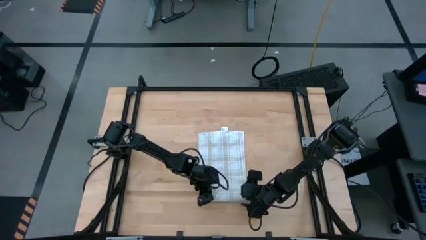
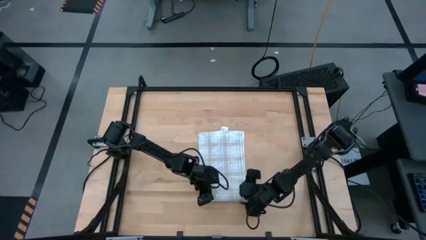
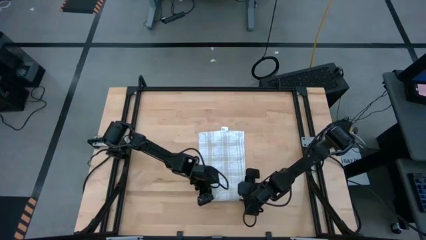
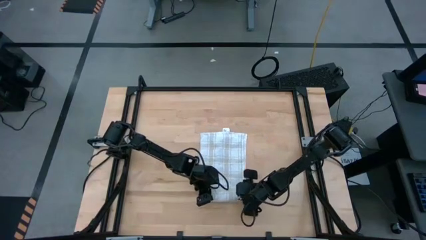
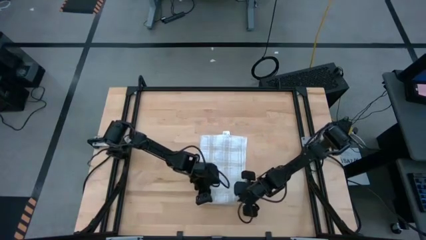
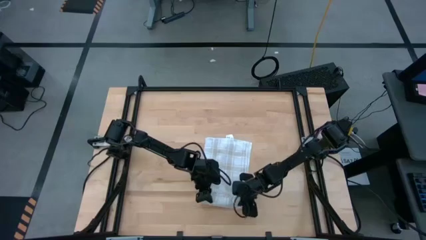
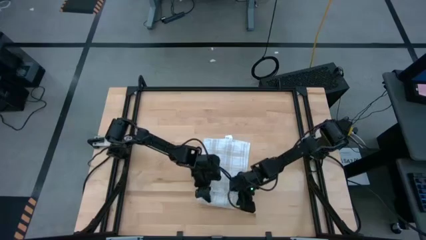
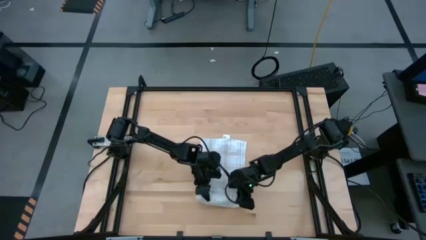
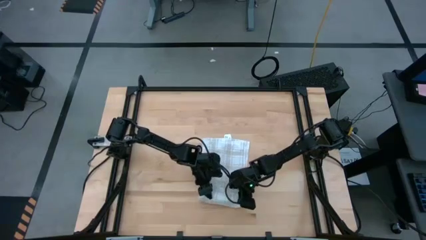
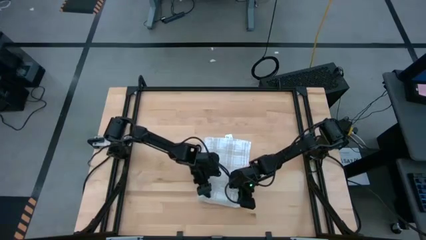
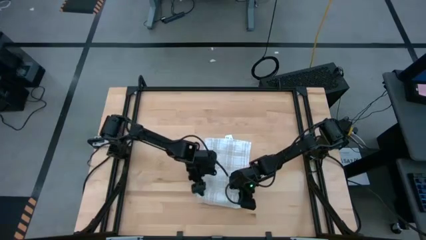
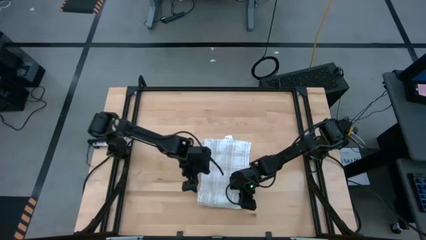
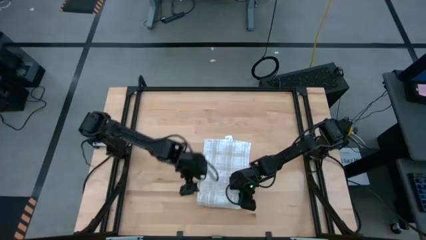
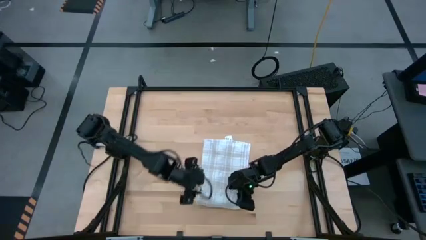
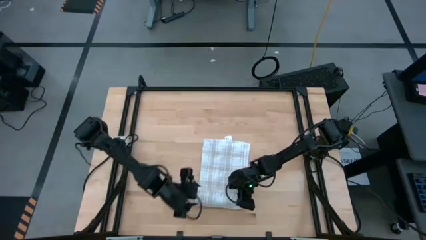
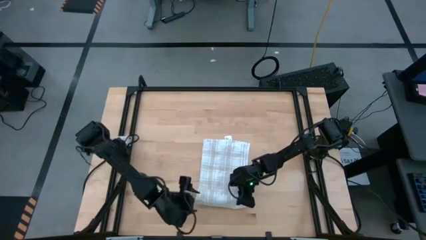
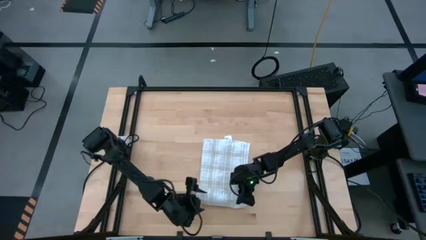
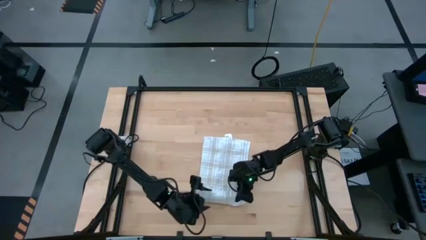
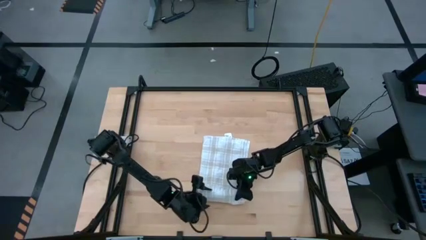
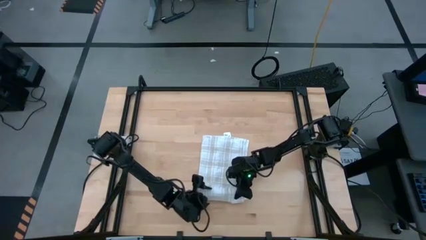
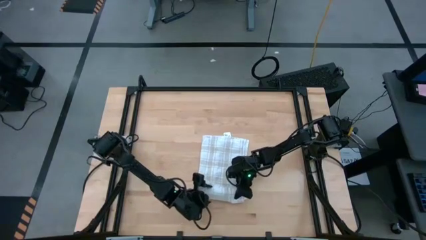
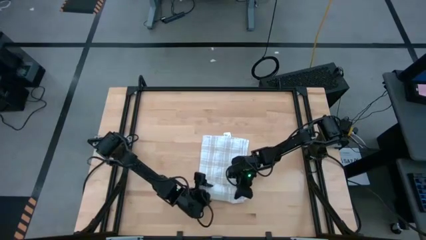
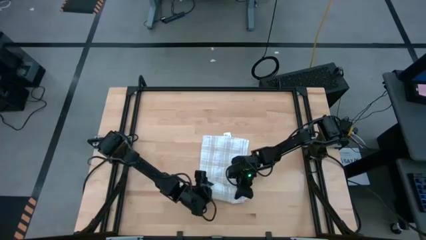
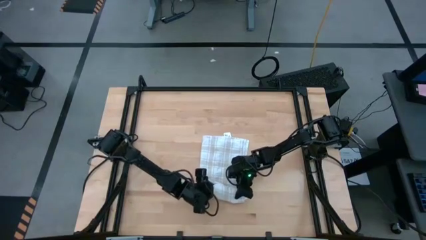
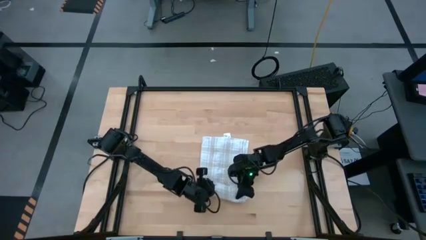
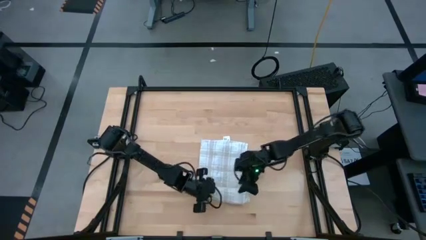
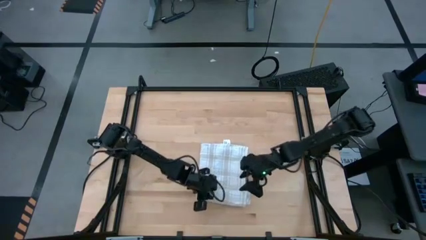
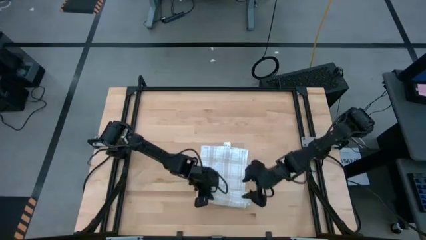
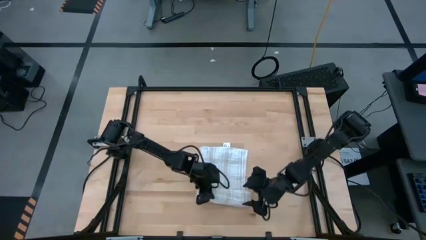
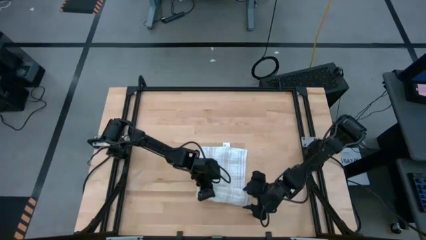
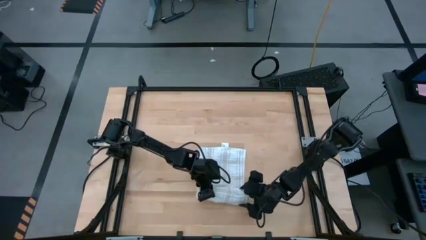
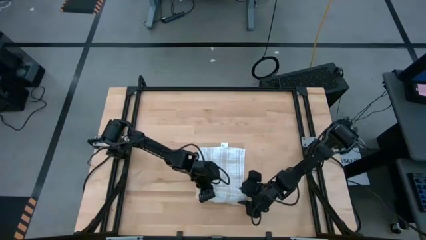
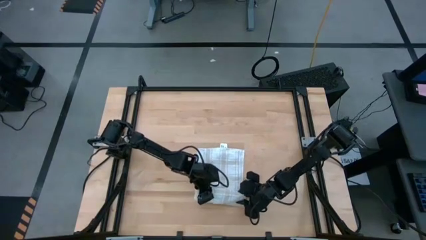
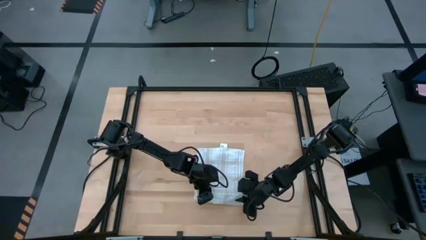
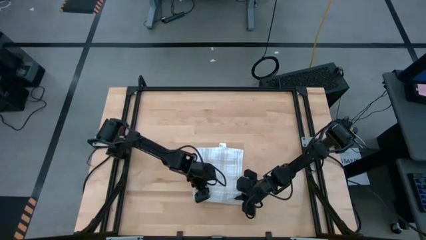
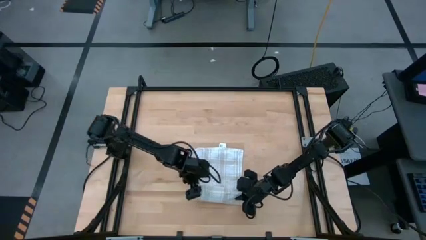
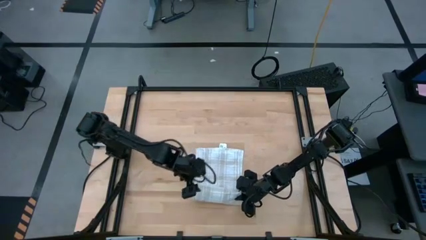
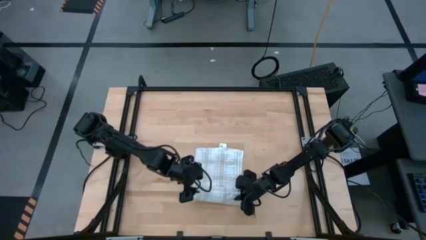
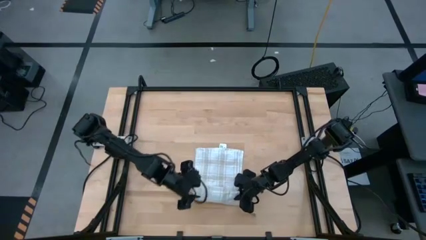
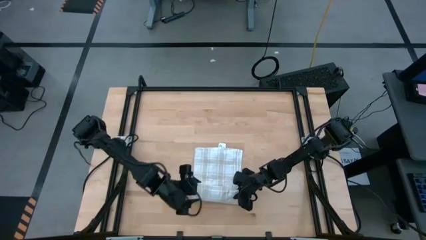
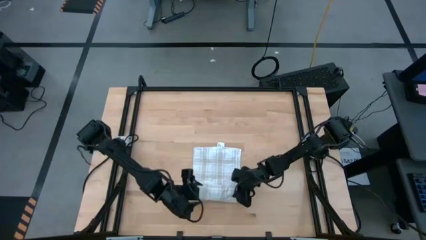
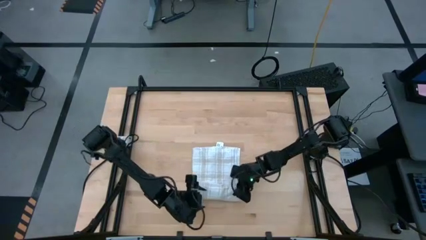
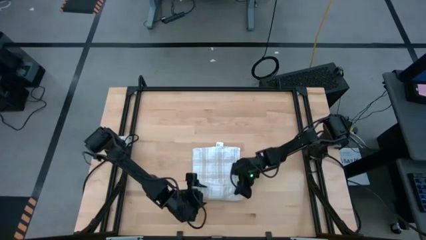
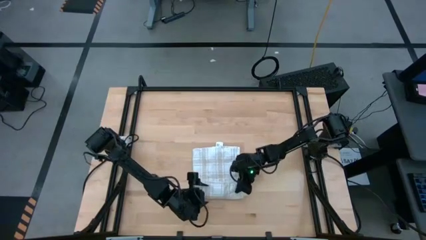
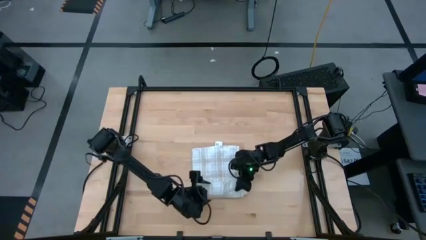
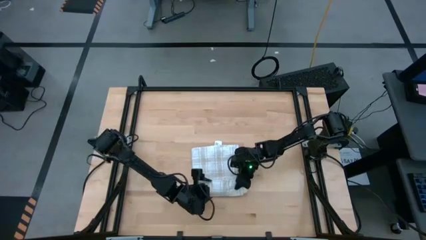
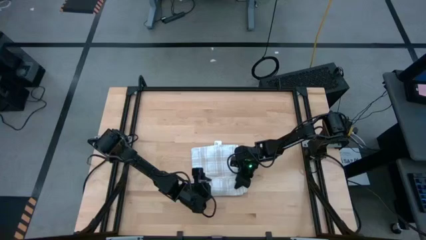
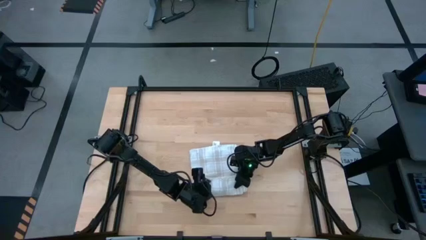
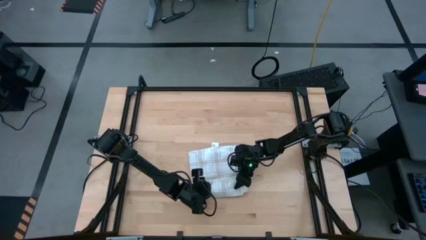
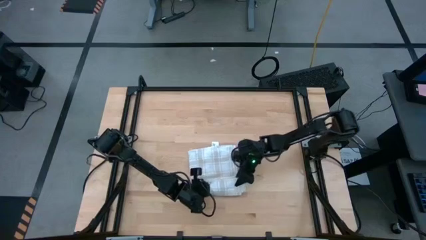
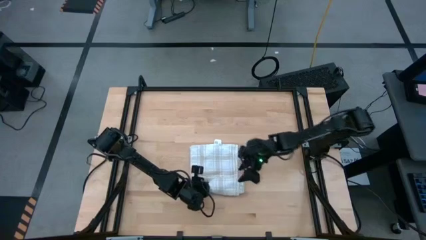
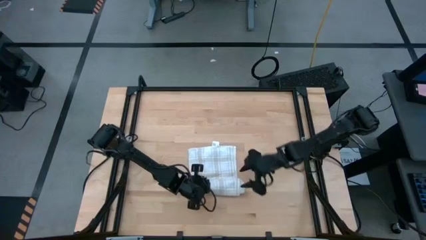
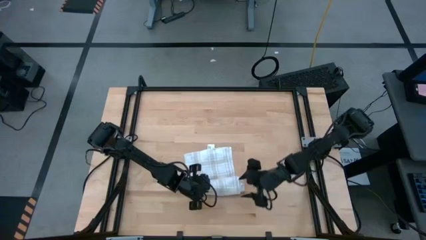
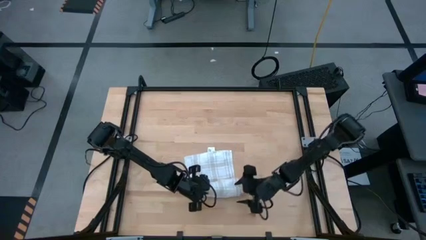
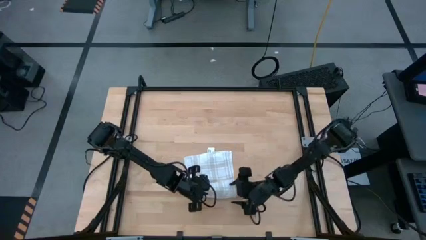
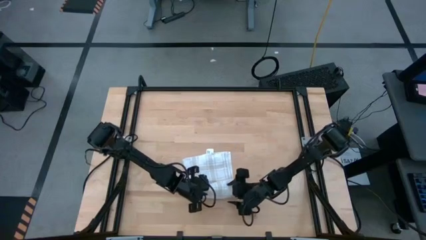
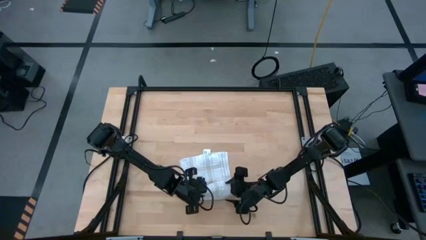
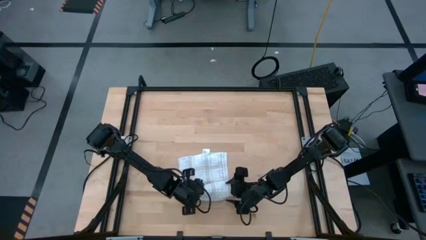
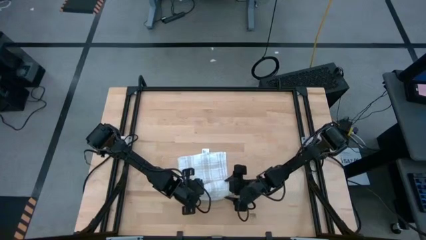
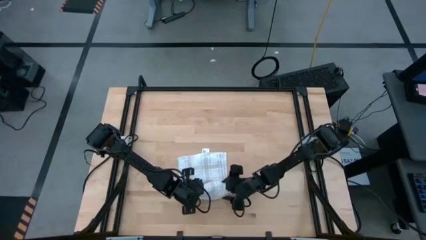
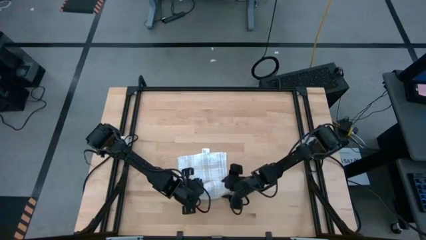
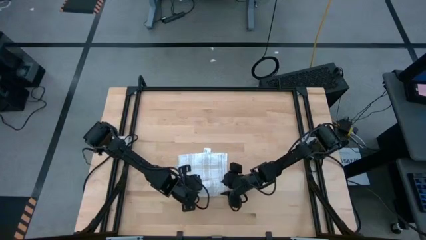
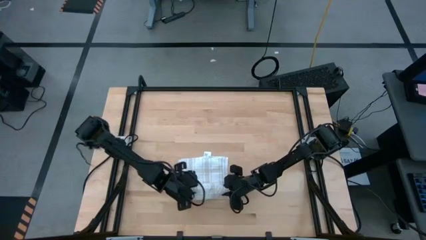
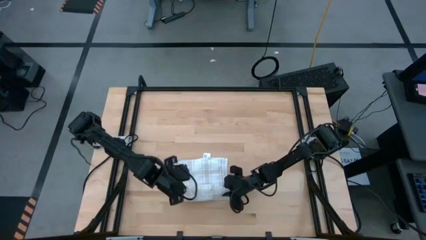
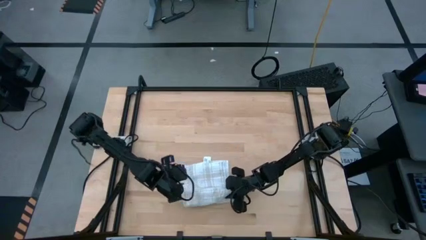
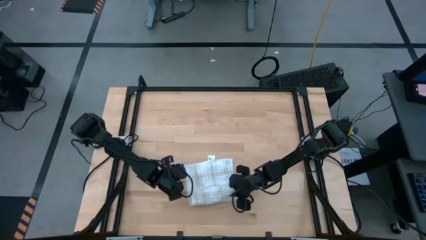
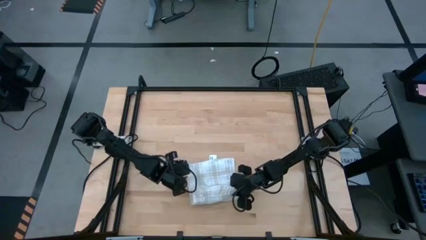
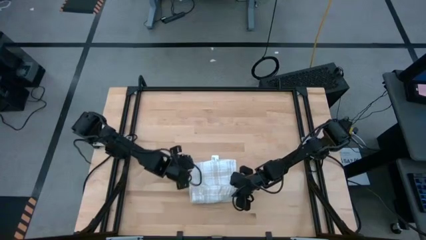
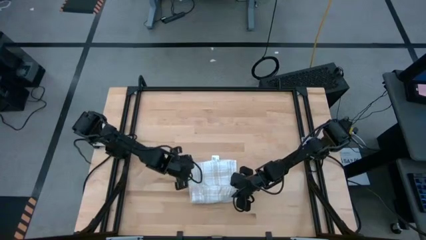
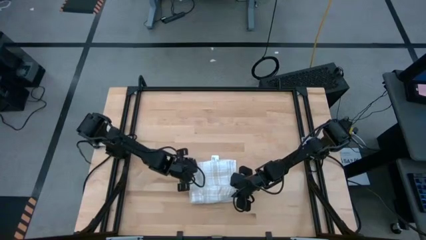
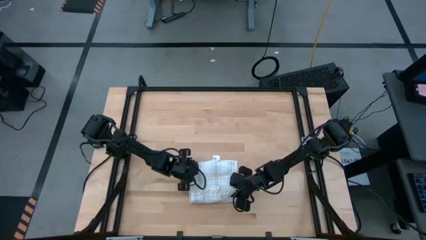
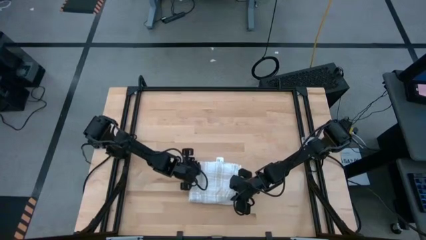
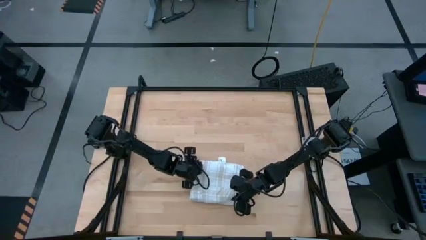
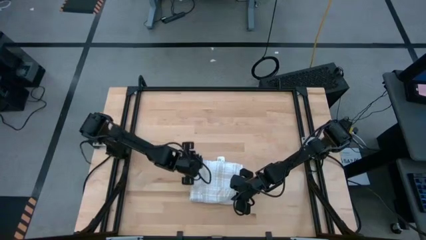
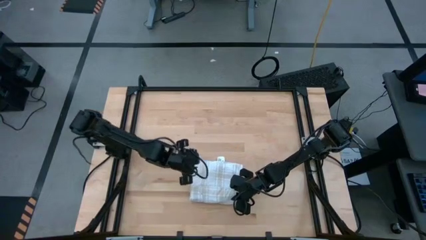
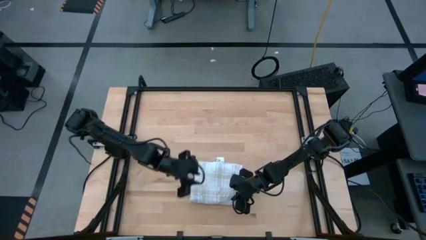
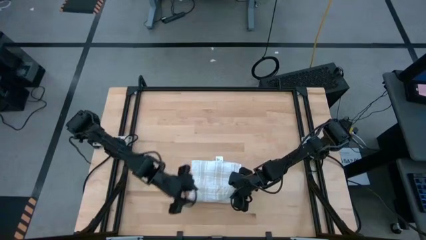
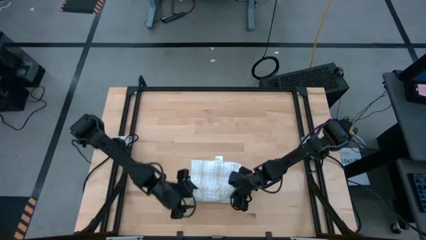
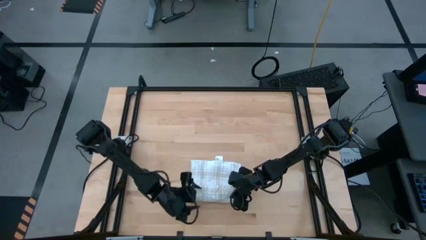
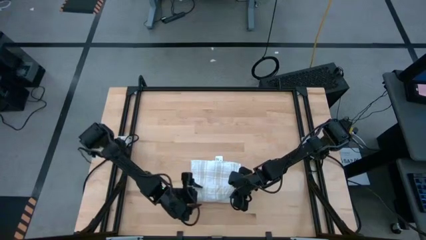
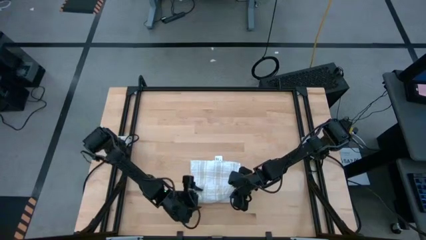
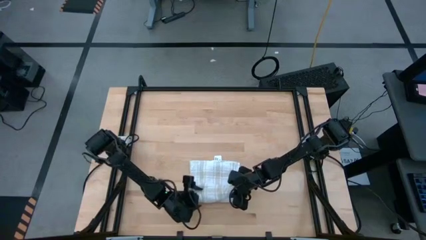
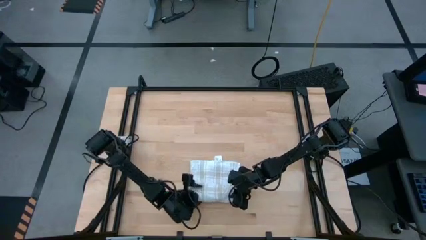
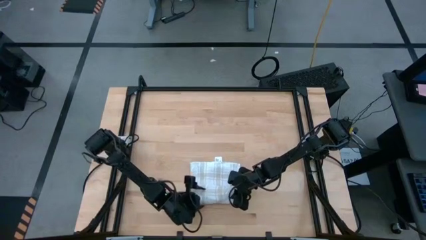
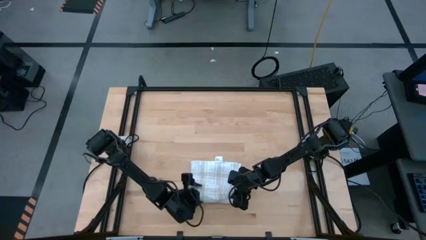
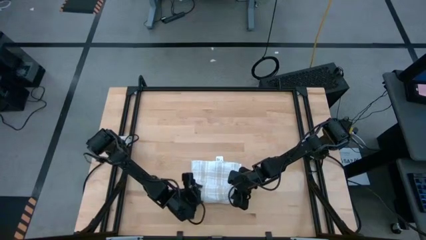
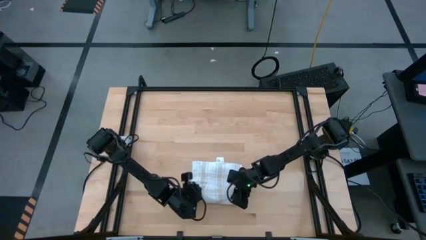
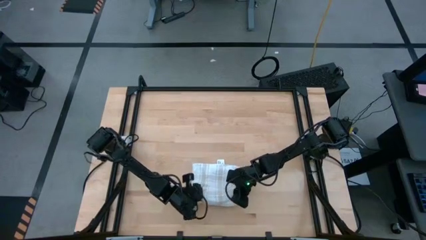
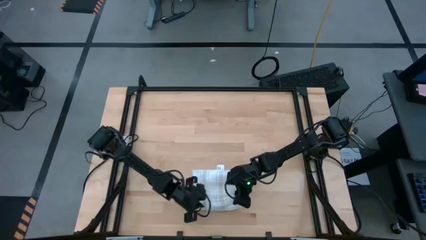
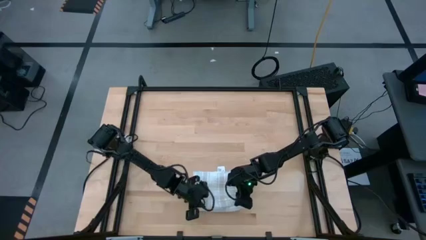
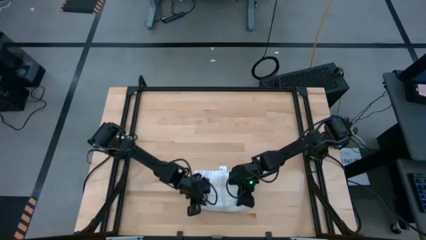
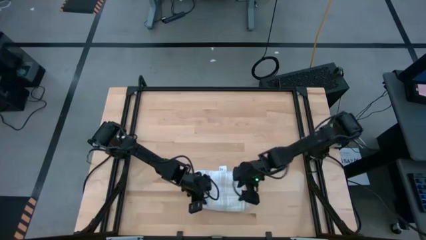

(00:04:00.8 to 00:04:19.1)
Task: Roll towel into tight, uniform cylinder
Roll the white towel
